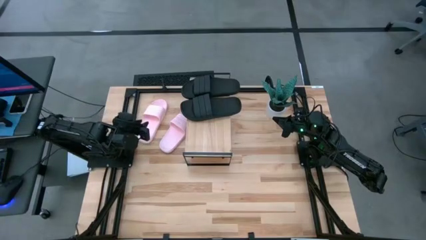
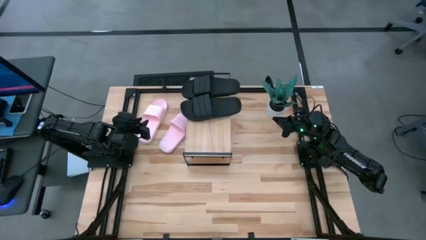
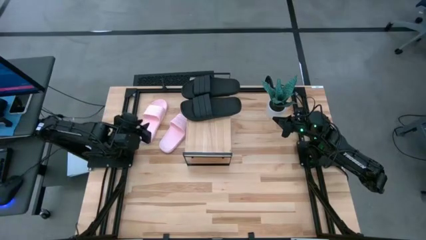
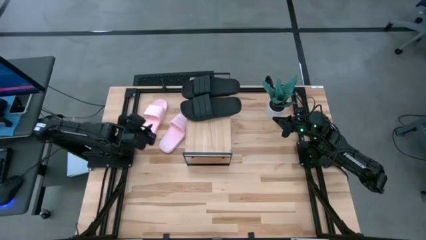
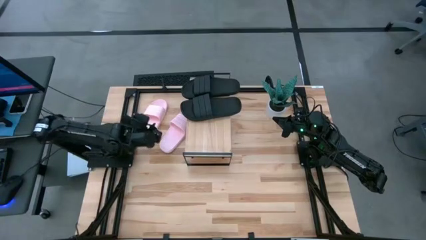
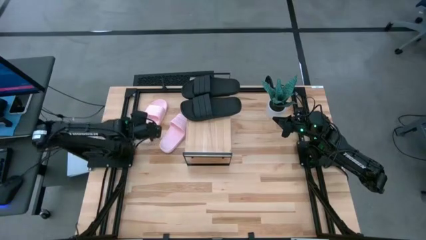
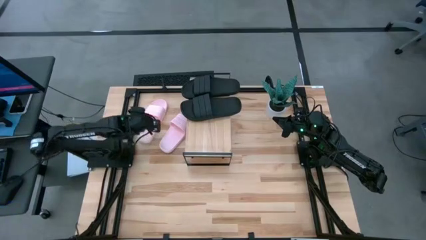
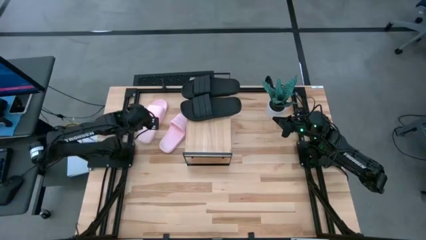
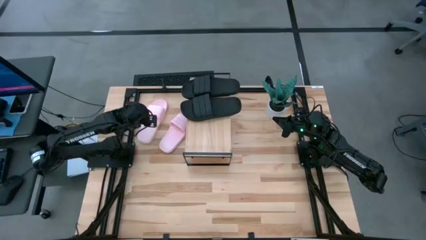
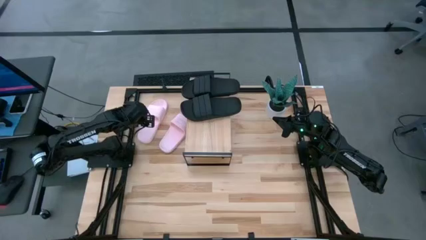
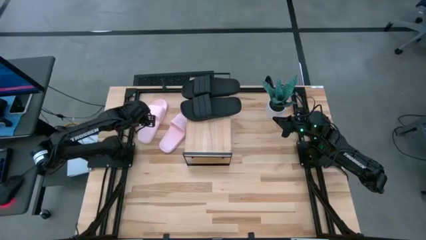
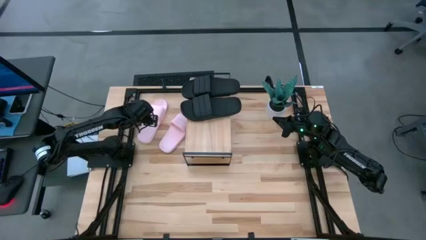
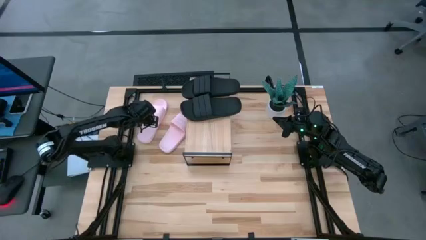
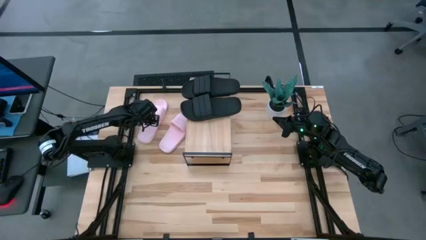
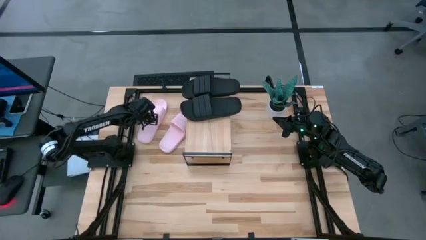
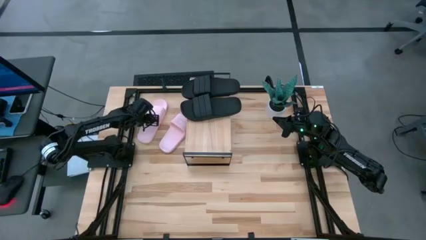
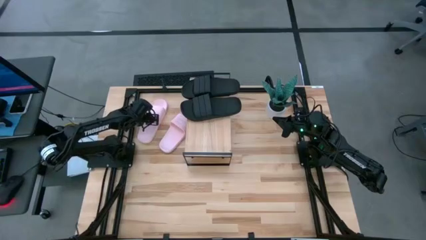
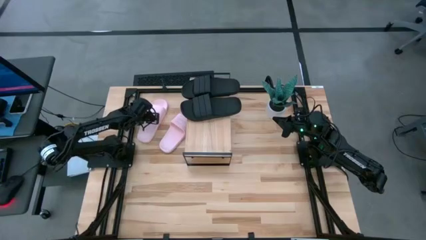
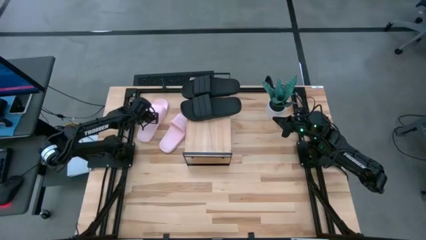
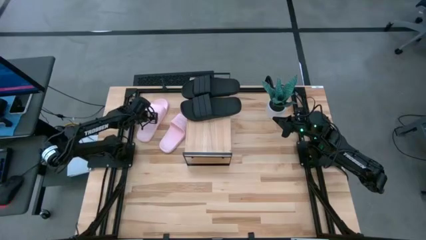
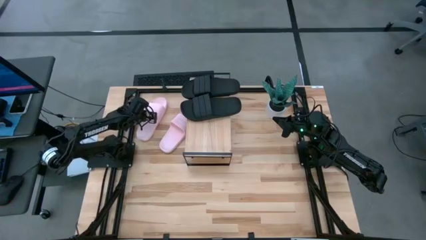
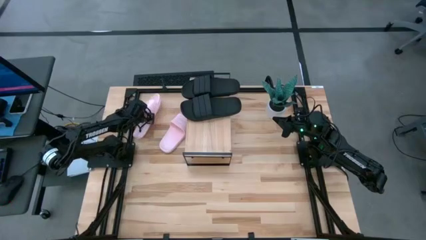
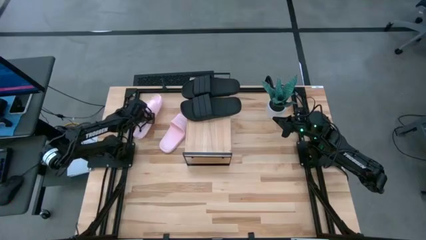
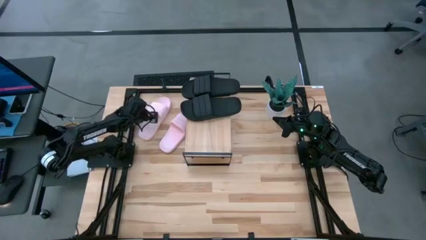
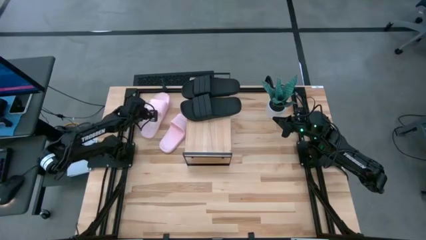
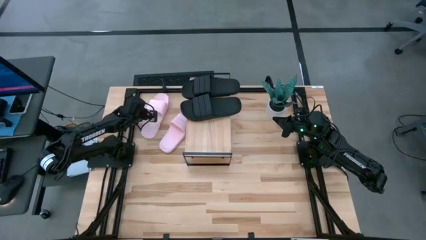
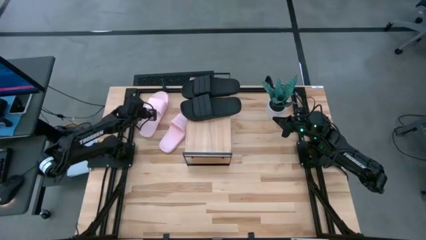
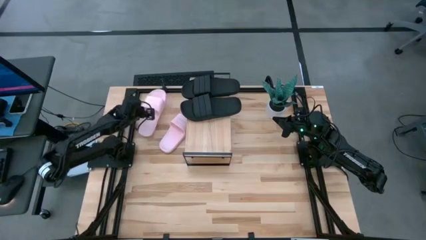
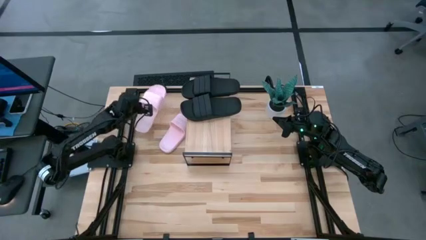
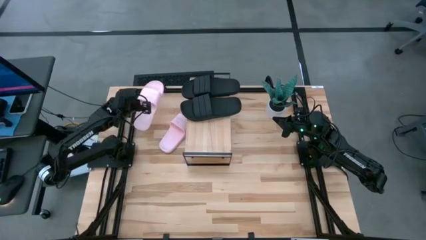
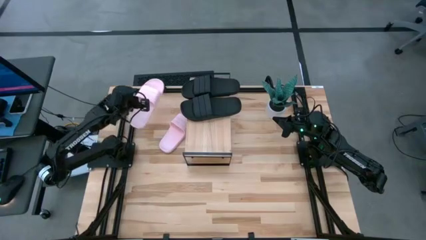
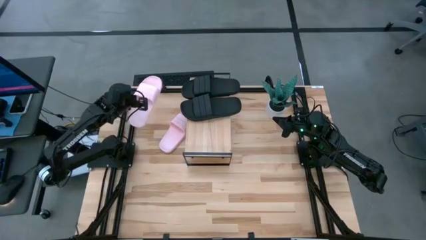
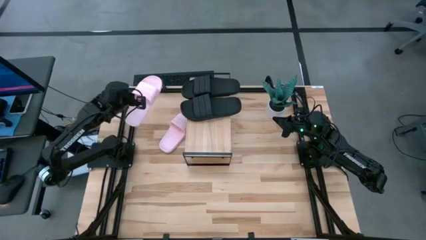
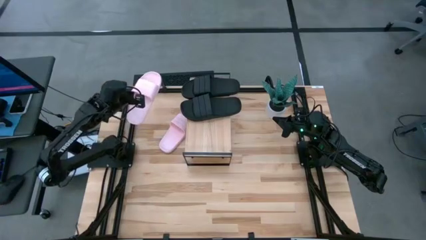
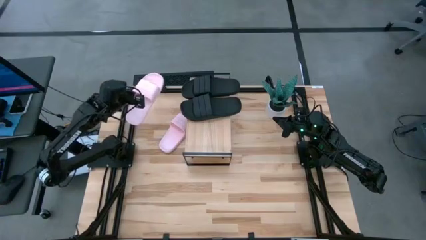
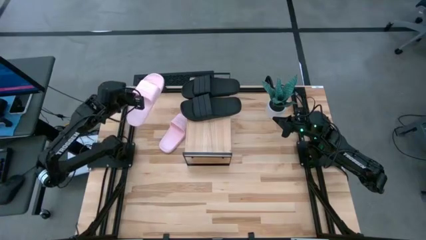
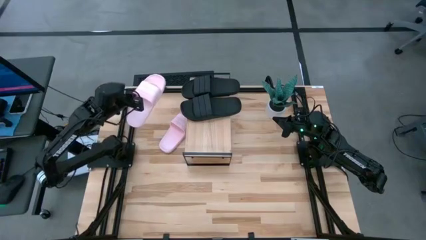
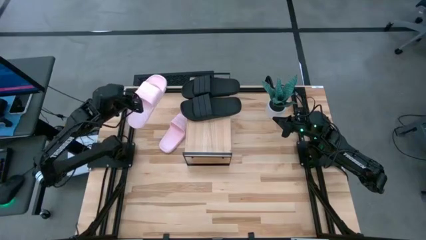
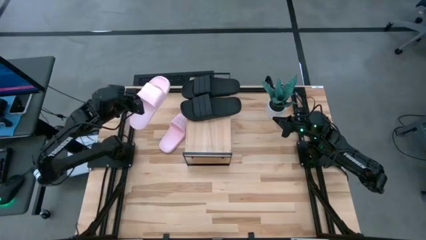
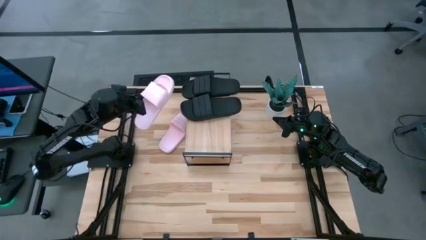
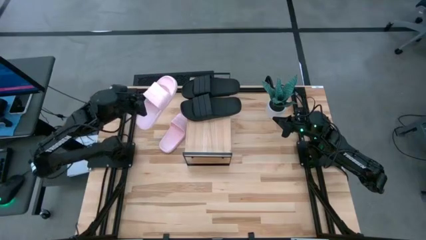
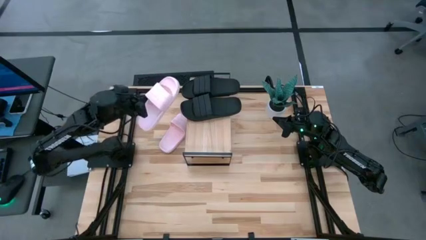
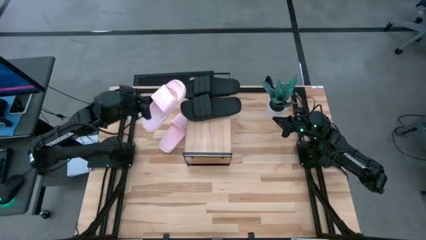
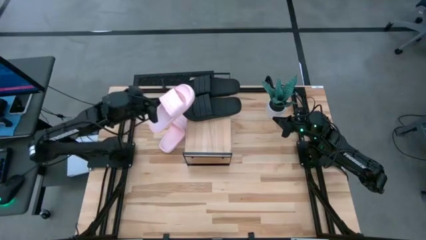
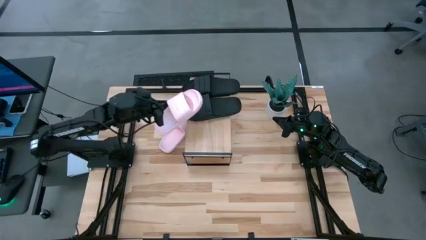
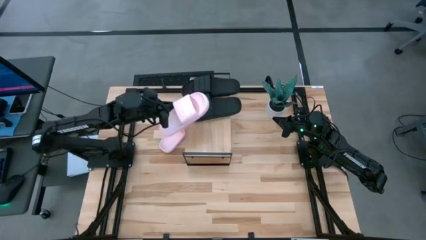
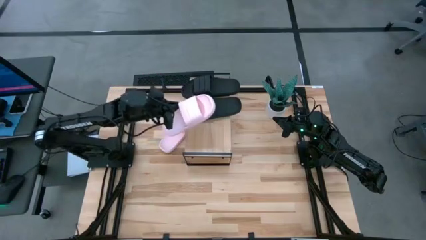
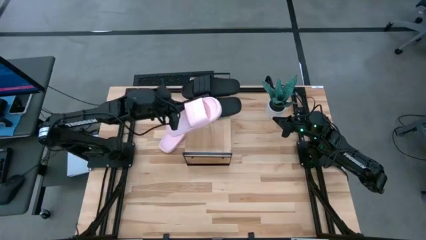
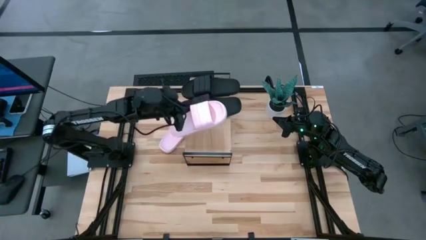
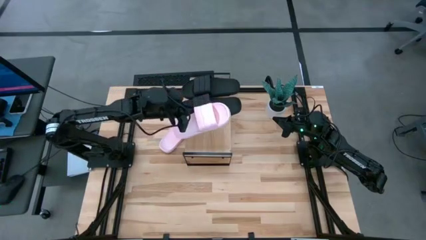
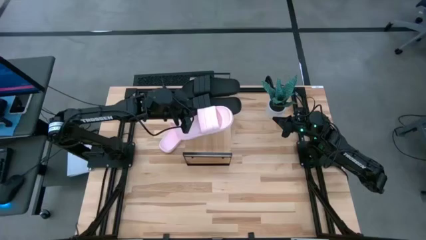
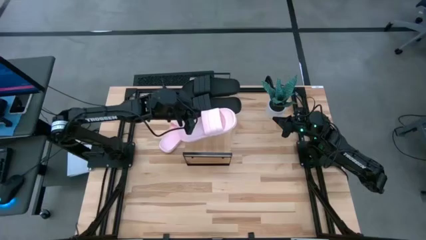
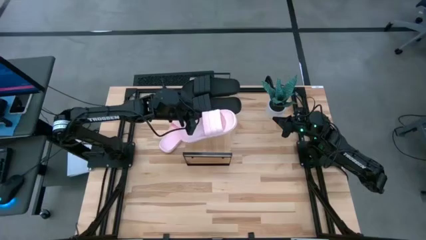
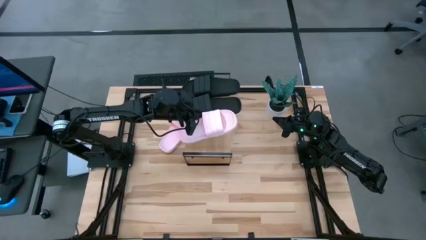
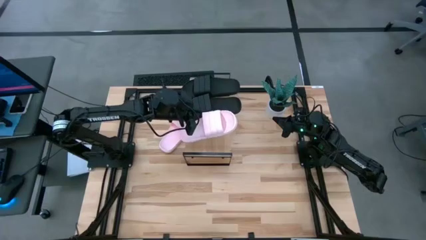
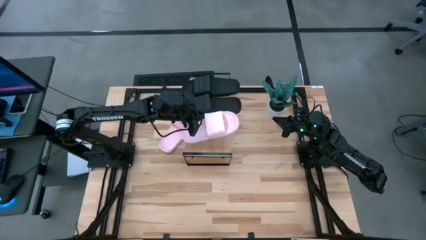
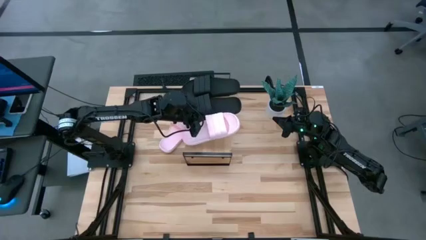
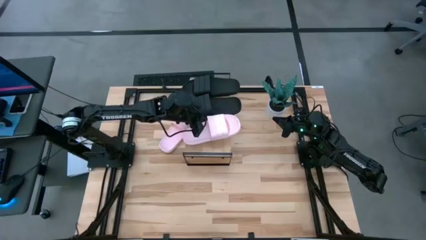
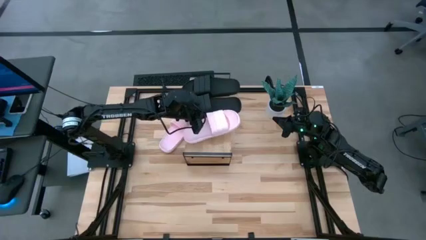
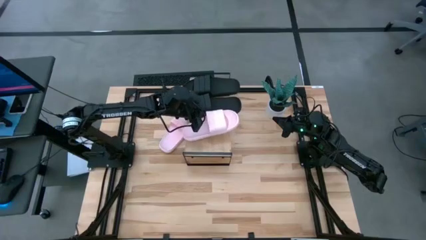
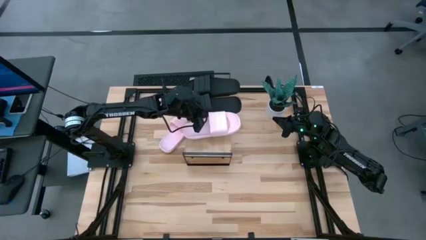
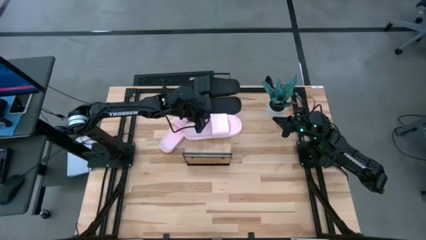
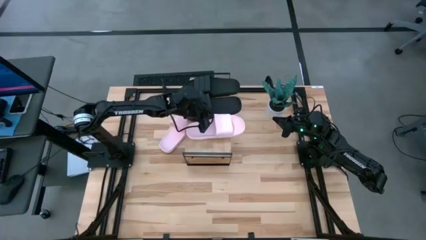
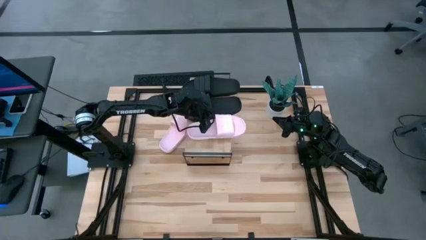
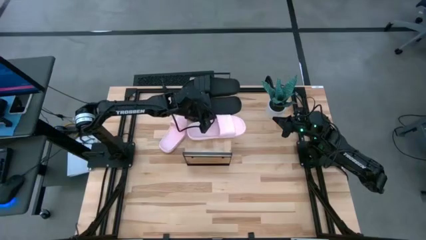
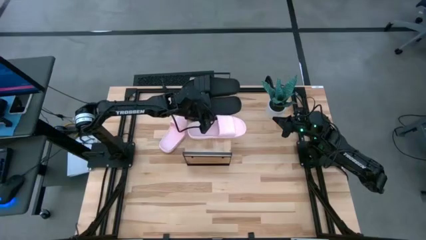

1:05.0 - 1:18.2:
Task: Pick and place slides into the shelf
Put the left pink slide on the shelf
